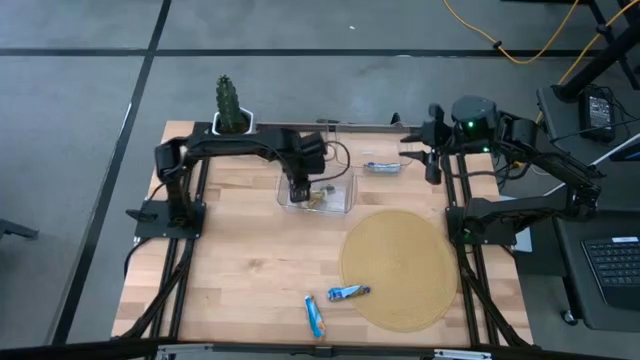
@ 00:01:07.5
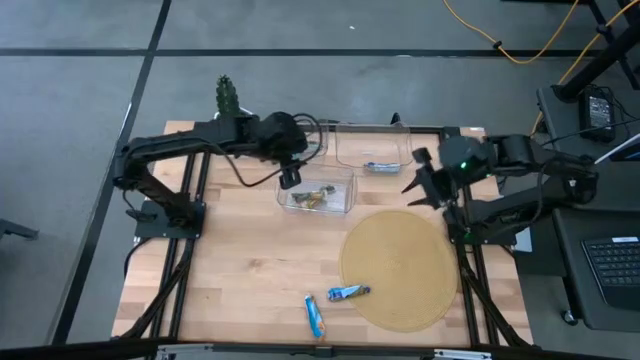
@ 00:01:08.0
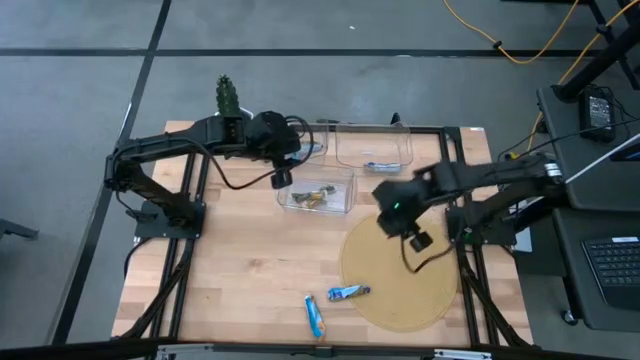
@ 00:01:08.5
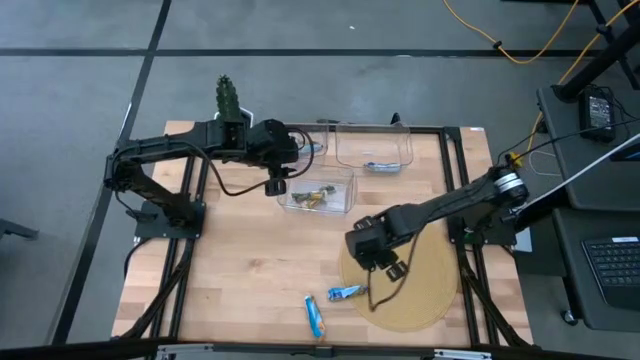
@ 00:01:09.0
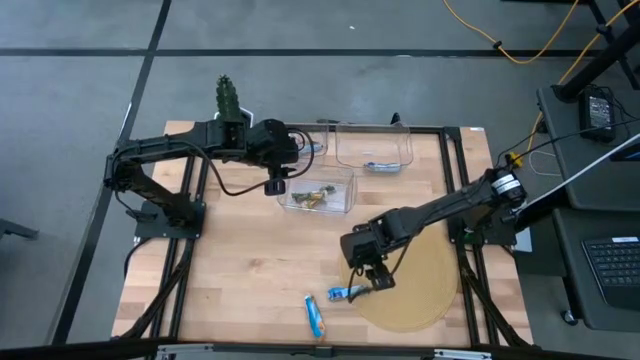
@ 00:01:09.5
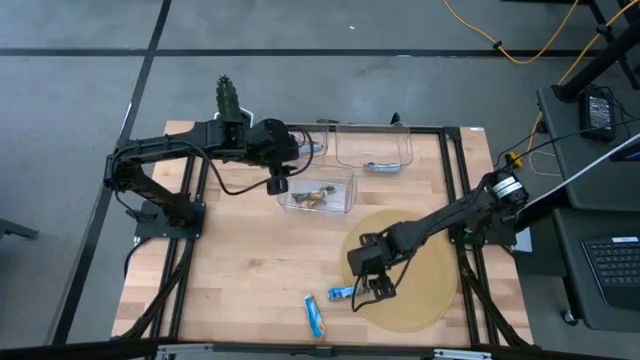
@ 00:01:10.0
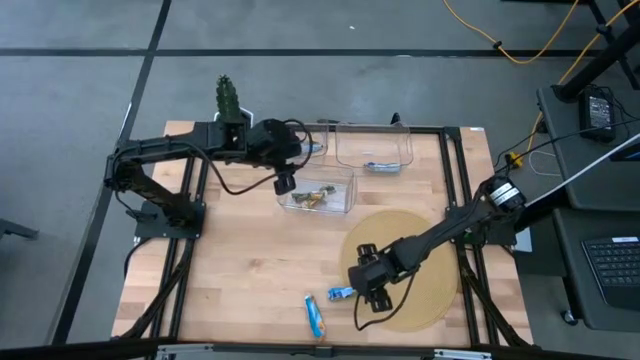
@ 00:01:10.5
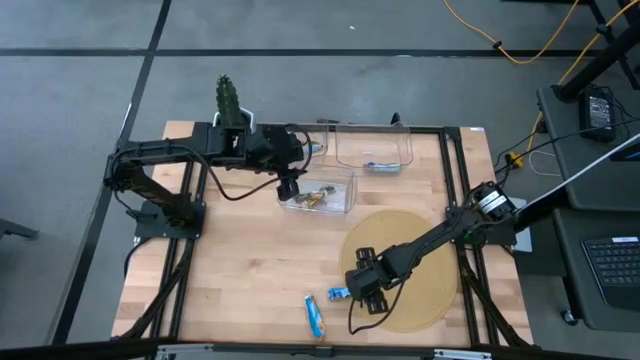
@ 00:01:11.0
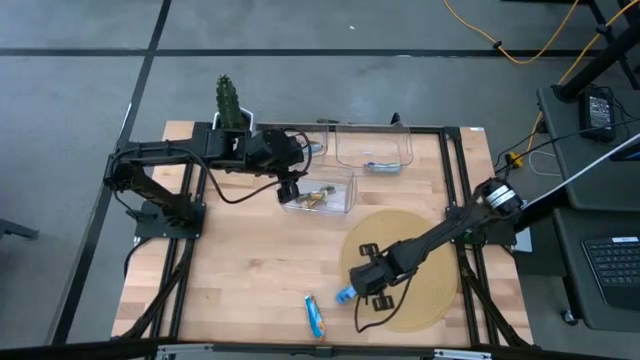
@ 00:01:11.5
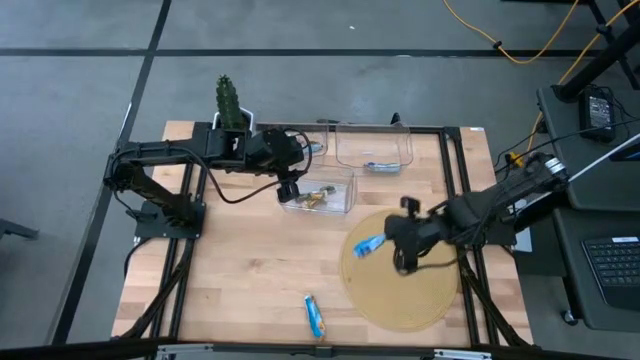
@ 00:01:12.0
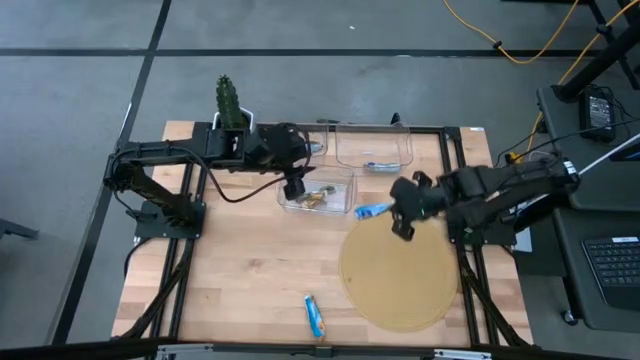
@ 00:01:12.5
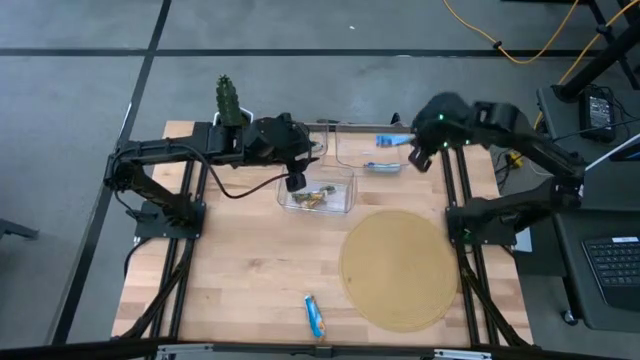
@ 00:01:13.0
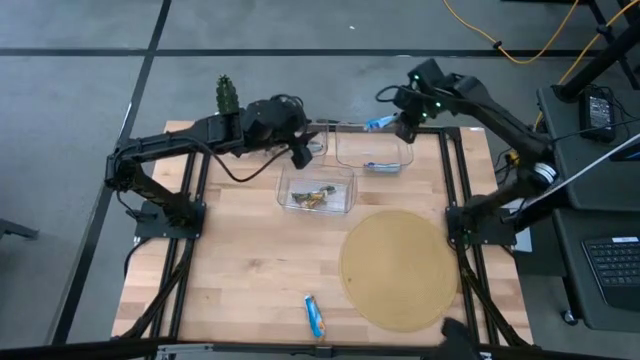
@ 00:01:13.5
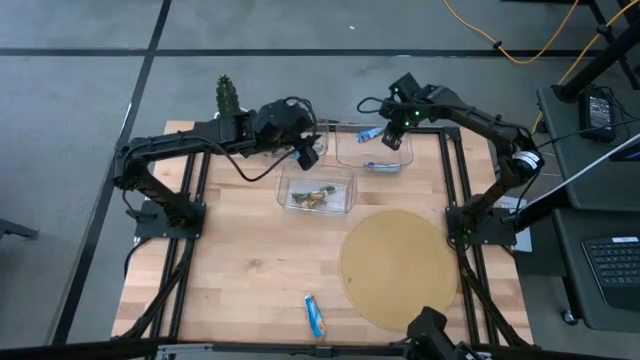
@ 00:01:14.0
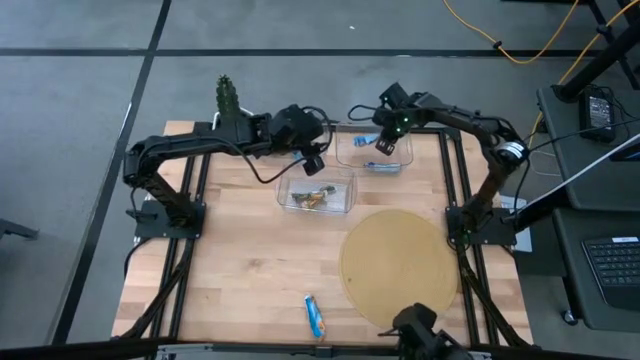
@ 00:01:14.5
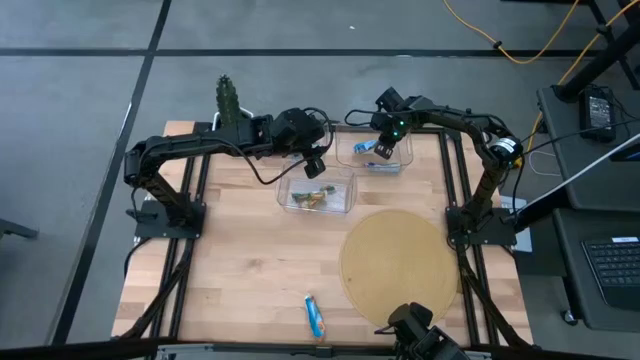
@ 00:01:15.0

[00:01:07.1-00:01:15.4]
Task: Pick and place Granola Bars by type
Put the blue granola bar into the top right transparent bin

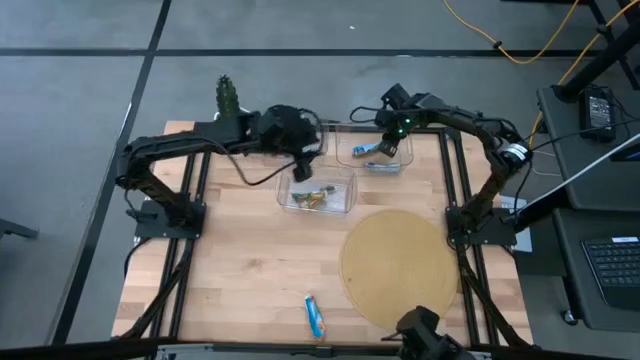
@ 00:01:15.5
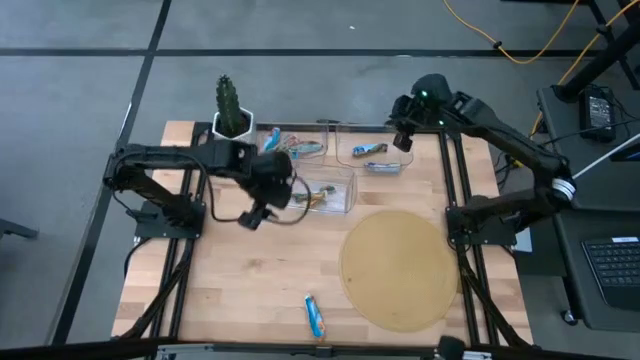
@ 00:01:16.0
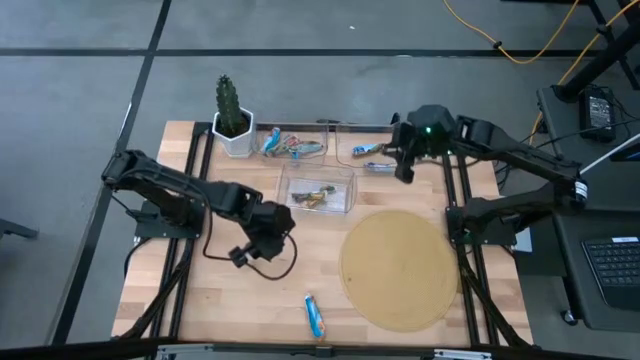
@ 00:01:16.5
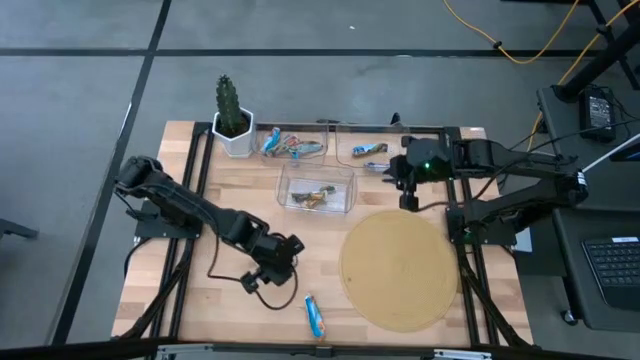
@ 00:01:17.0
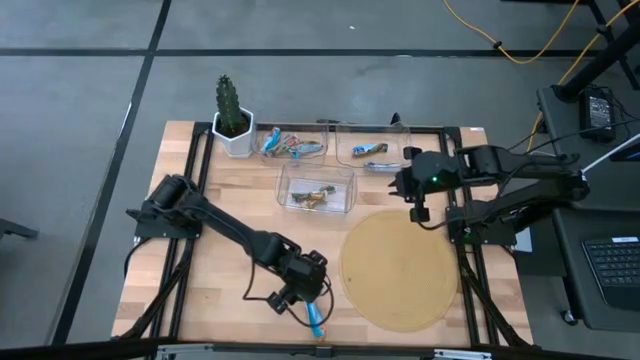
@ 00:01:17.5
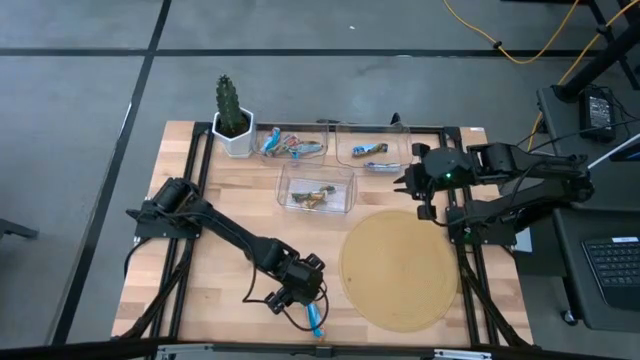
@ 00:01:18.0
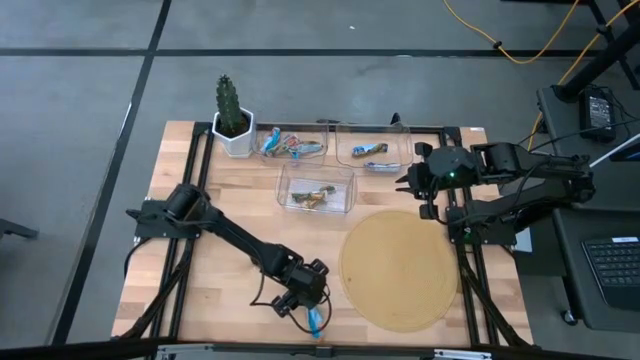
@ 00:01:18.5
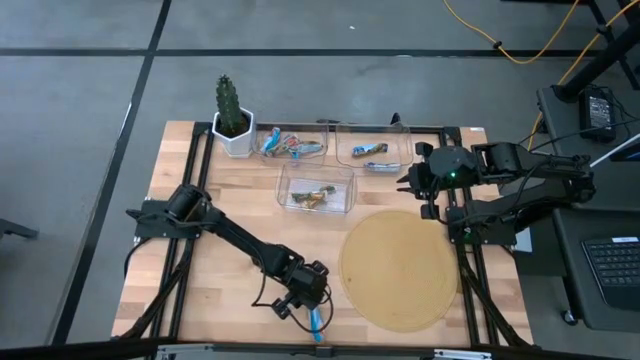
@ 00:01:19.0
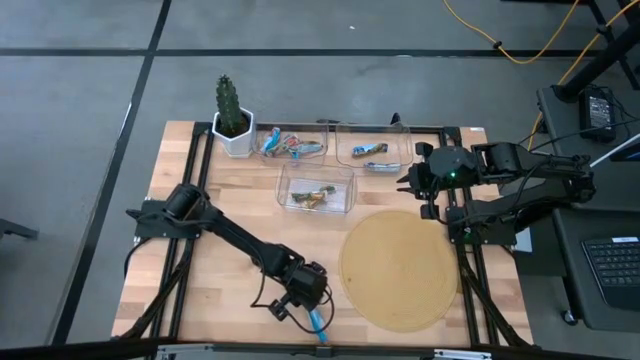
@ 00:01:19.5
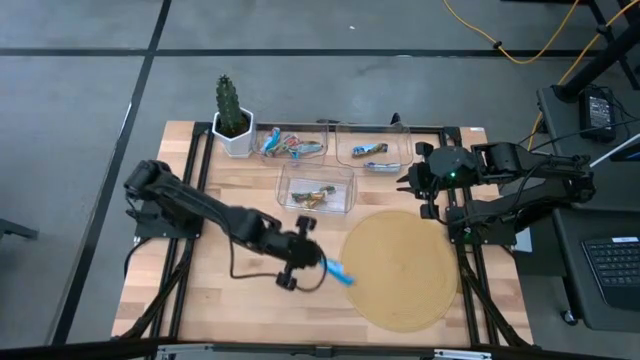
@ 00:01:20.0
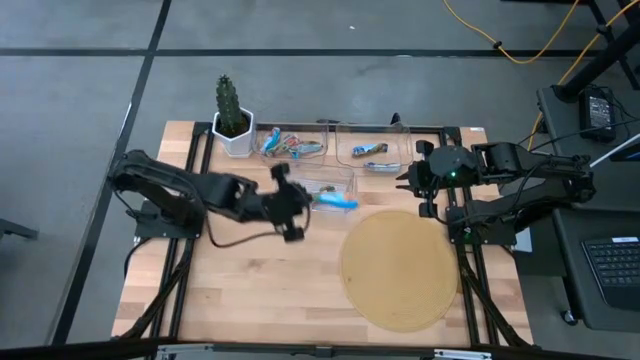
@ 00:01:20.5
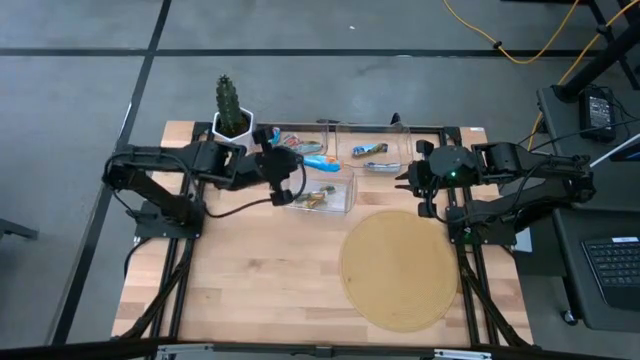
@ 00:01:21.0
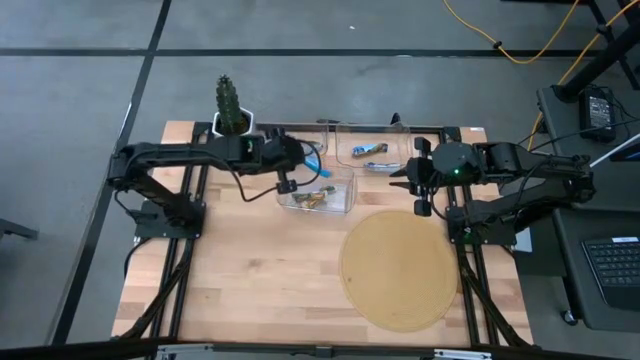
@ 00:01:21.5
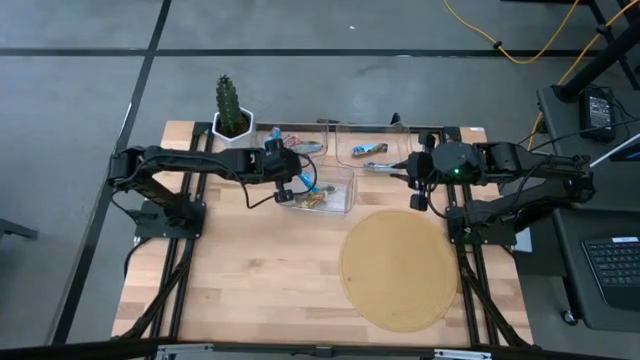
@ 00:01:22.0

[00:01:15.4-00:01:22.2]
Put the yellow granola bar into the bottom transparent bin

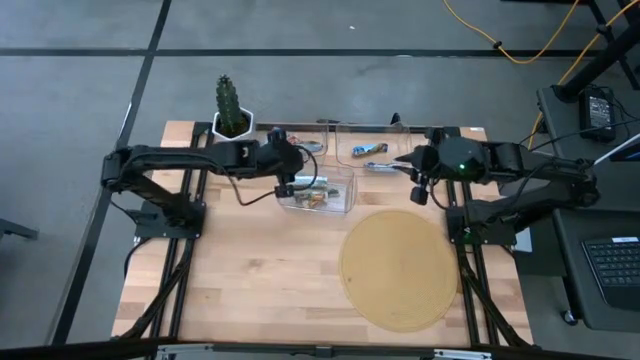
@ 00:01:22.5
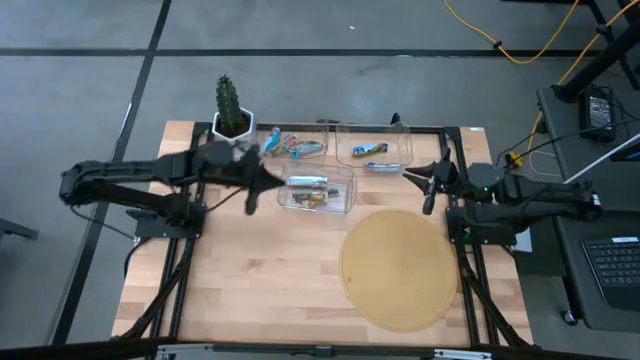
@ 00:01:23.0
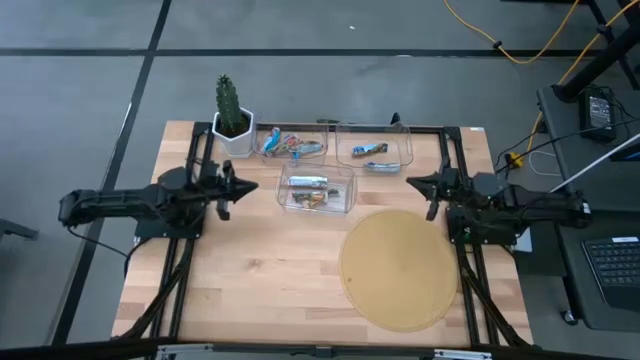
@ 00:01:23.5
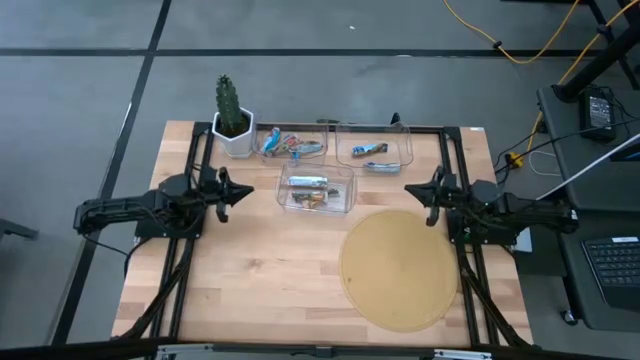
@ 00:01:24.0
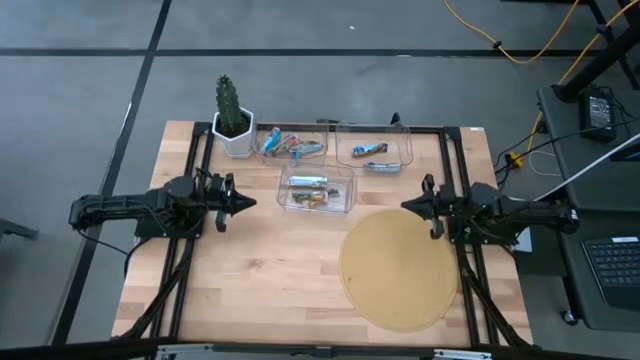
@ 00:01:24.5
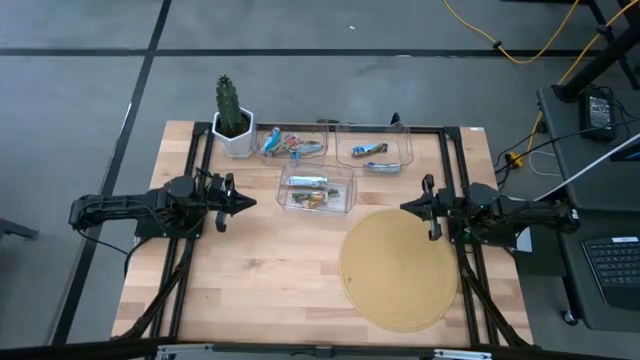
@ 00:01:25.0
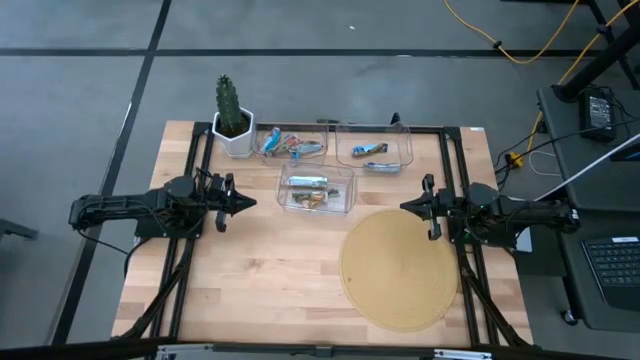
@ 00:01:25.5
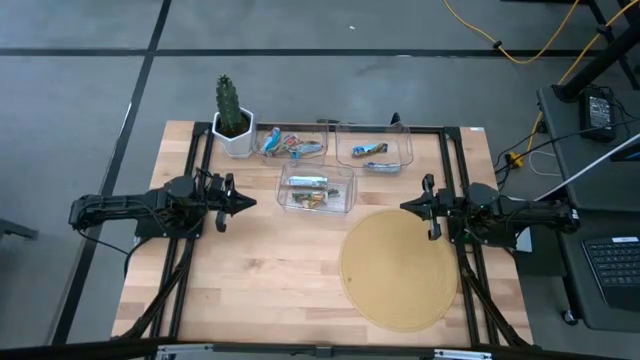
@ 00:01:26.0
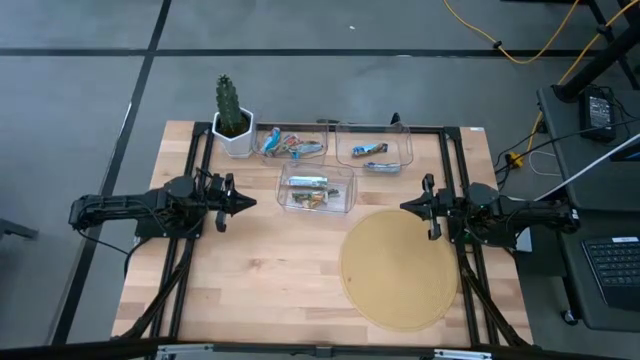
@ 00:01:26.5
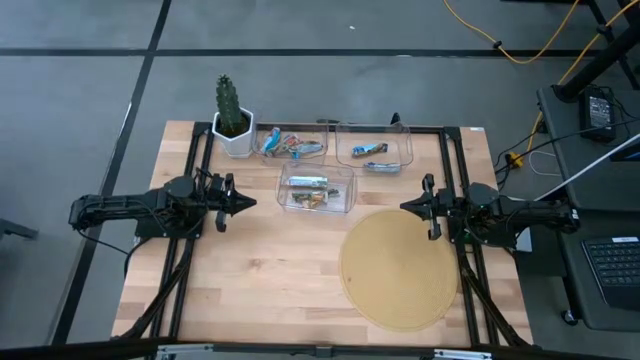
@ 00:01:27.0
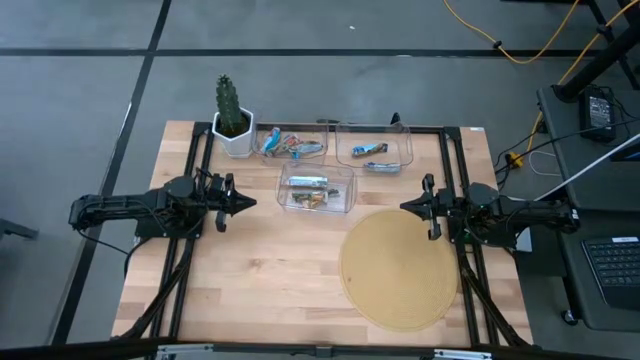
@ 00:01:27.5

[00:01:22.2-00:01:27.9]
Return to Home Position

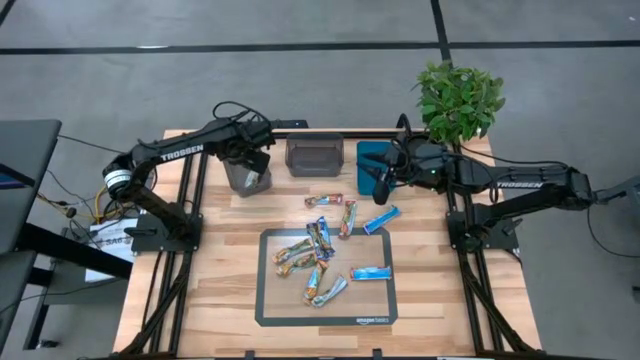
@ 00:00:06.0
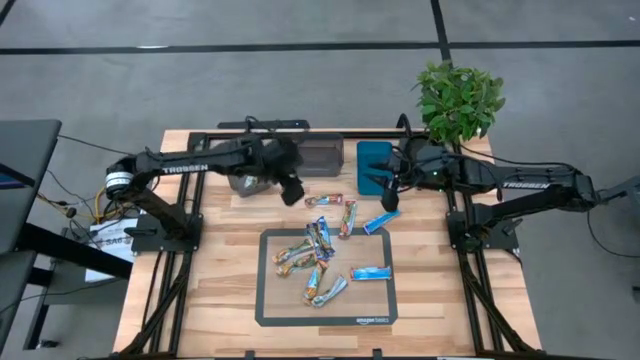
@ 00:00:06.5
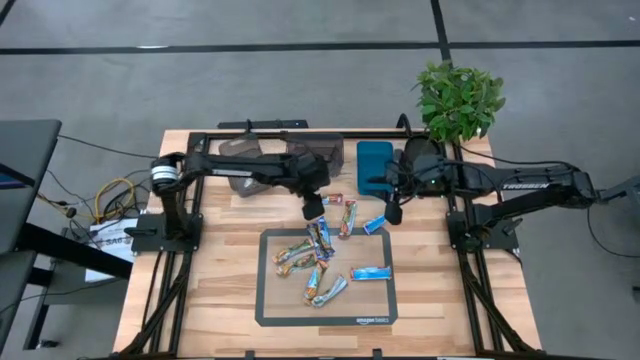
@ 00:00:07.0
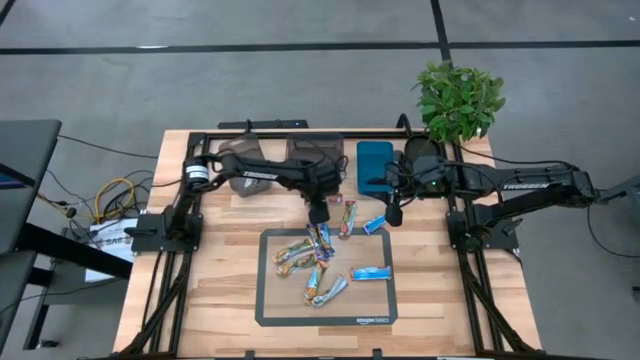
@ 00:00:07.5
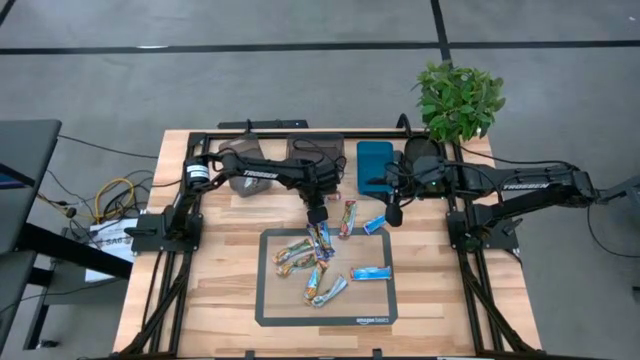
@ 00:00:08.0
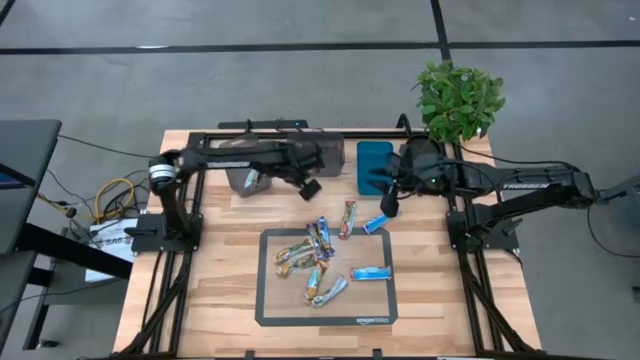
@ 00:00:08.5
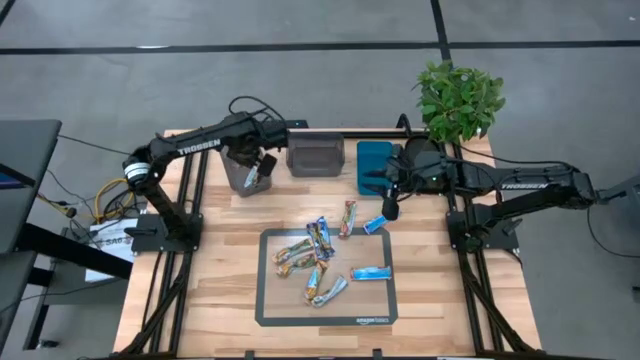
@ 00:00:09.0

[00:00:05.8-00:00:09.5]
Task: Pick and place Granola Bars by type
Put the red granola bar into the left black transparent bin
